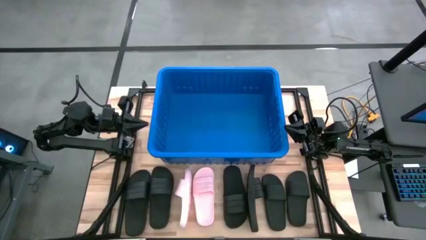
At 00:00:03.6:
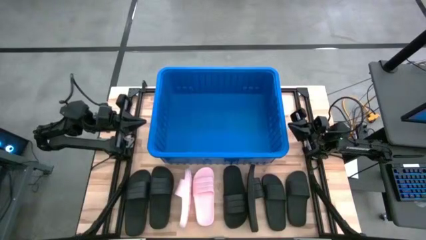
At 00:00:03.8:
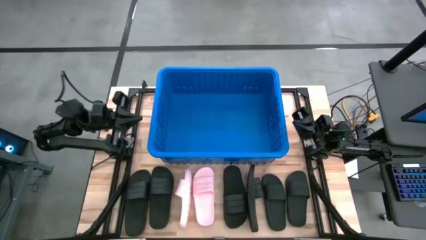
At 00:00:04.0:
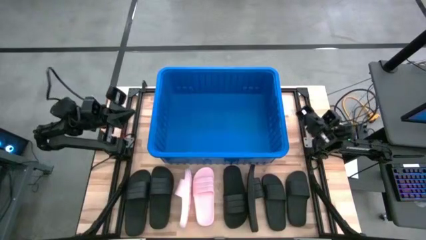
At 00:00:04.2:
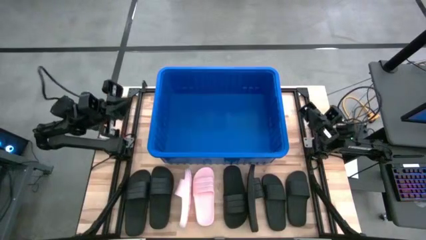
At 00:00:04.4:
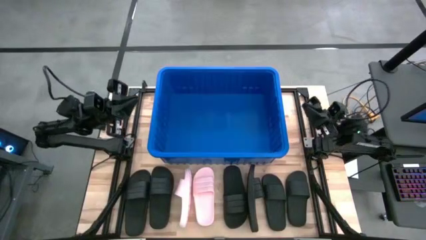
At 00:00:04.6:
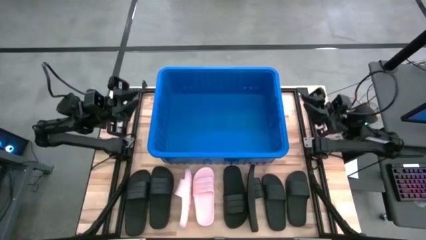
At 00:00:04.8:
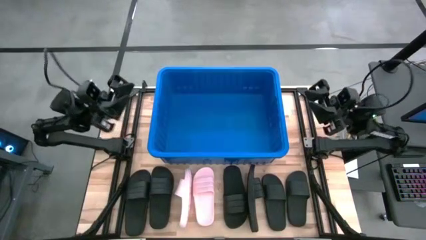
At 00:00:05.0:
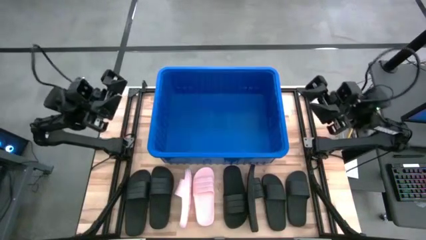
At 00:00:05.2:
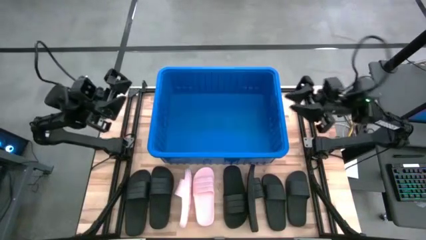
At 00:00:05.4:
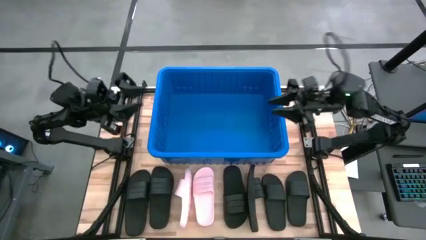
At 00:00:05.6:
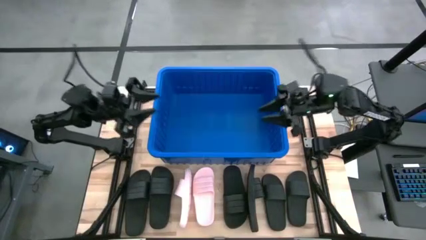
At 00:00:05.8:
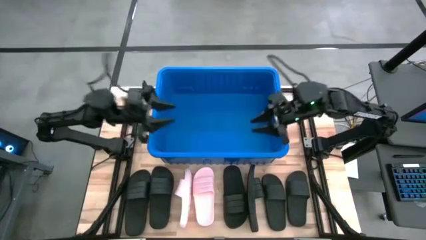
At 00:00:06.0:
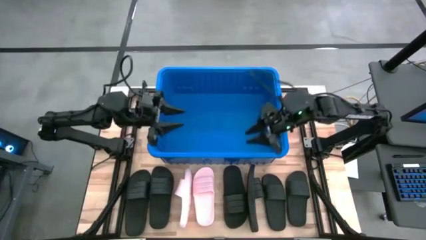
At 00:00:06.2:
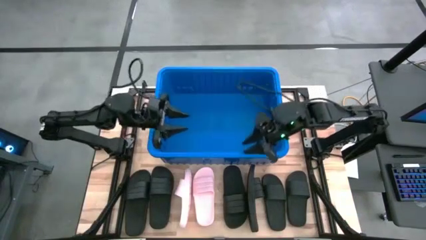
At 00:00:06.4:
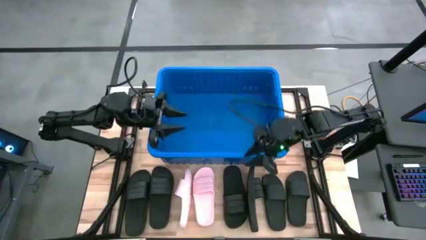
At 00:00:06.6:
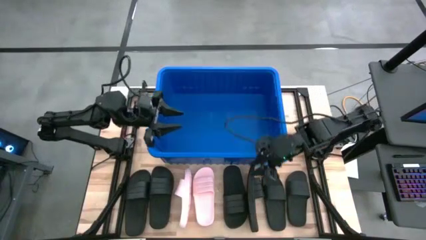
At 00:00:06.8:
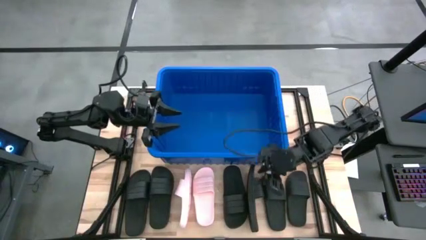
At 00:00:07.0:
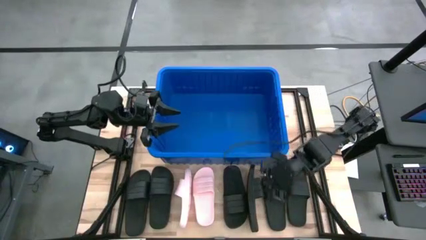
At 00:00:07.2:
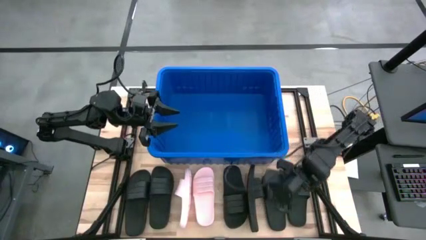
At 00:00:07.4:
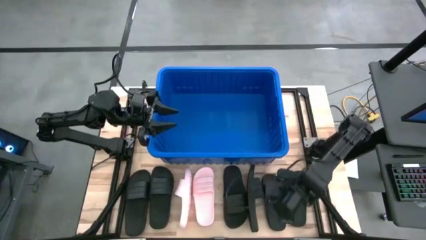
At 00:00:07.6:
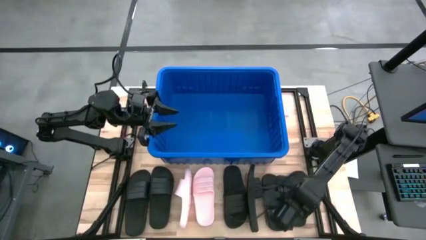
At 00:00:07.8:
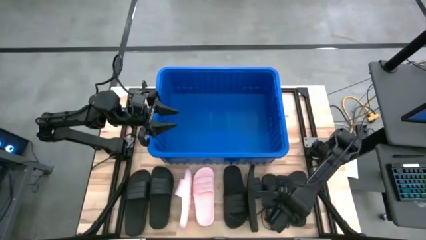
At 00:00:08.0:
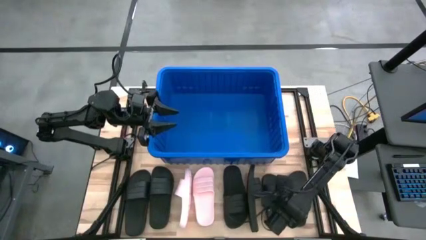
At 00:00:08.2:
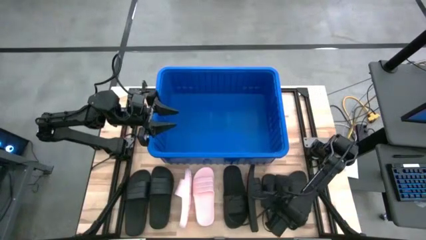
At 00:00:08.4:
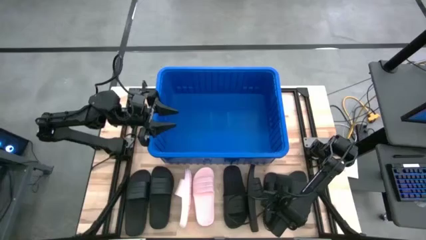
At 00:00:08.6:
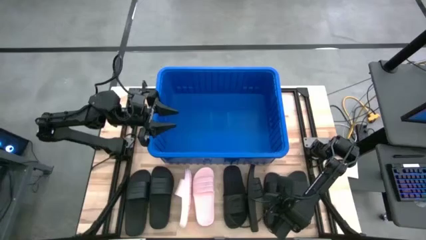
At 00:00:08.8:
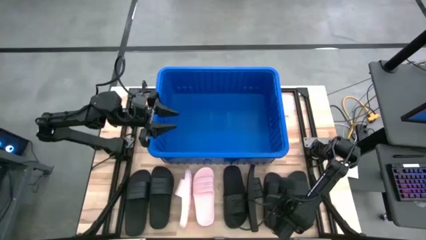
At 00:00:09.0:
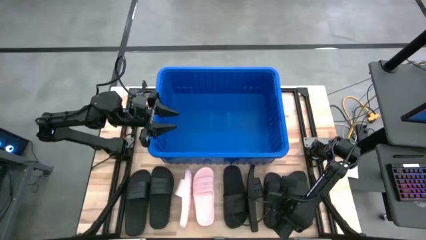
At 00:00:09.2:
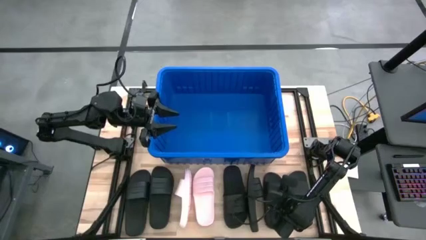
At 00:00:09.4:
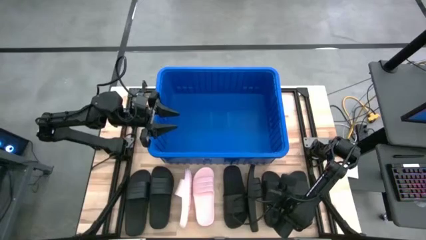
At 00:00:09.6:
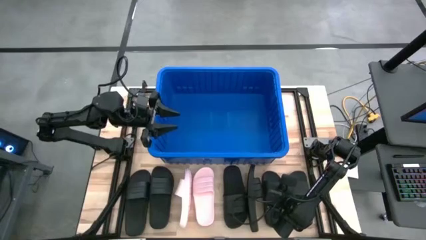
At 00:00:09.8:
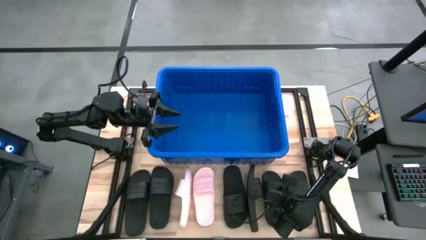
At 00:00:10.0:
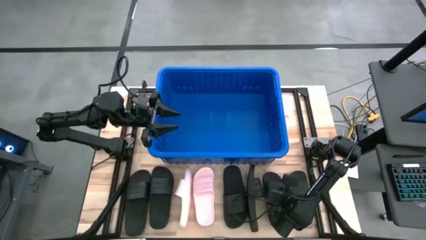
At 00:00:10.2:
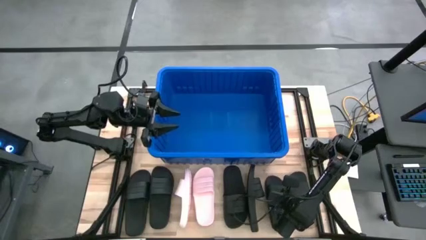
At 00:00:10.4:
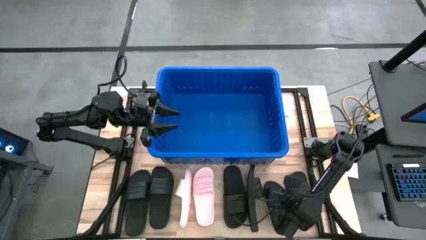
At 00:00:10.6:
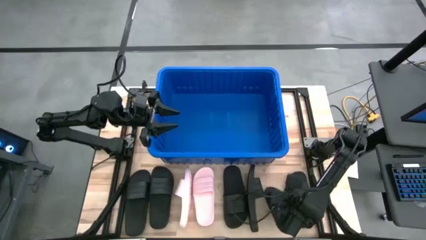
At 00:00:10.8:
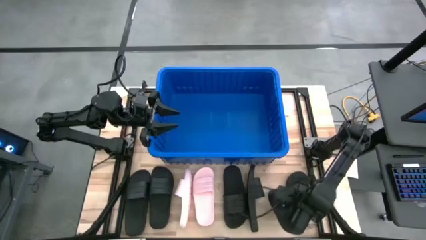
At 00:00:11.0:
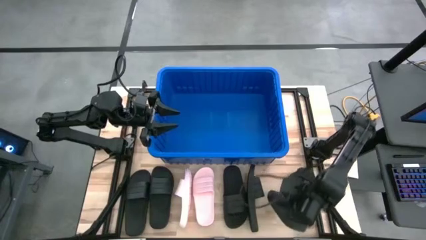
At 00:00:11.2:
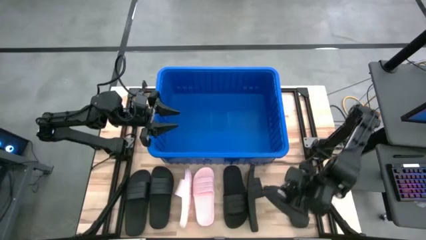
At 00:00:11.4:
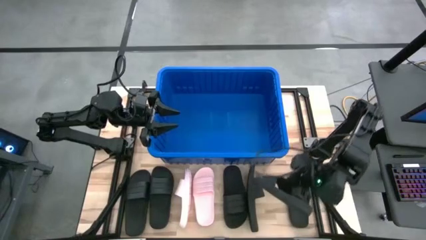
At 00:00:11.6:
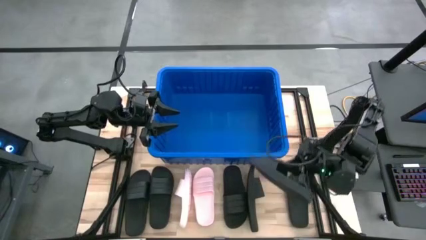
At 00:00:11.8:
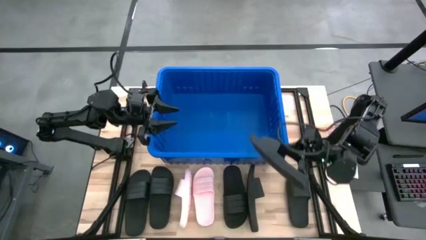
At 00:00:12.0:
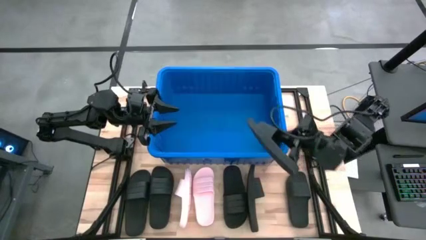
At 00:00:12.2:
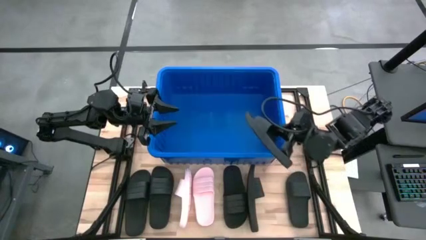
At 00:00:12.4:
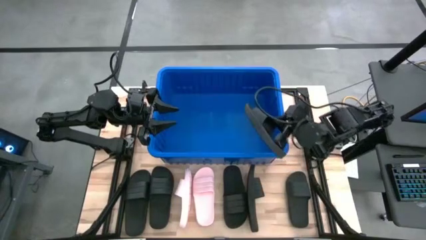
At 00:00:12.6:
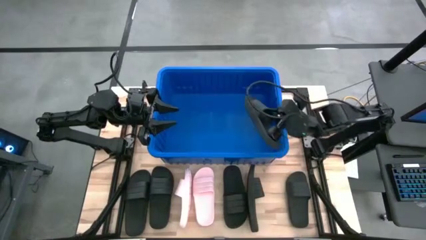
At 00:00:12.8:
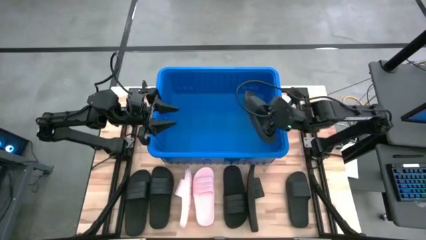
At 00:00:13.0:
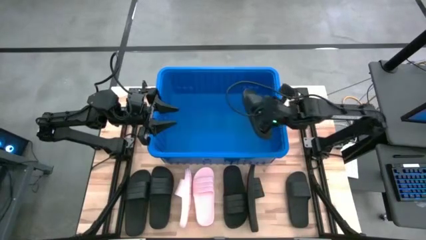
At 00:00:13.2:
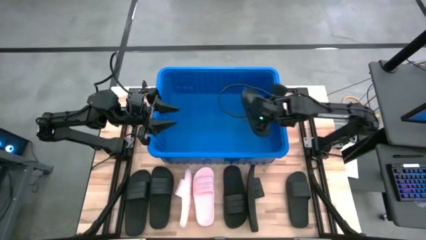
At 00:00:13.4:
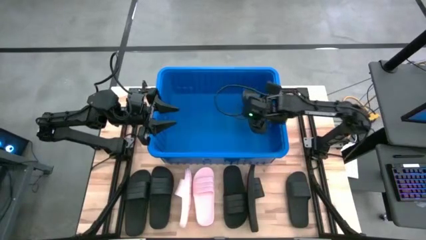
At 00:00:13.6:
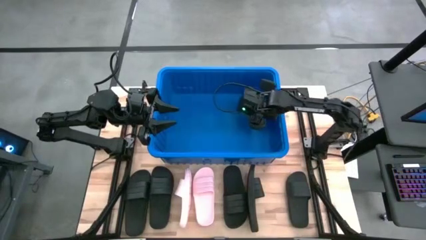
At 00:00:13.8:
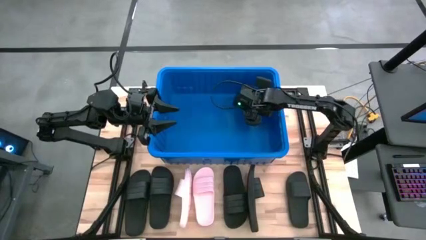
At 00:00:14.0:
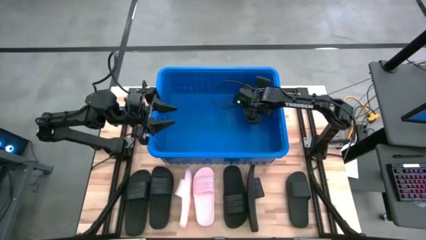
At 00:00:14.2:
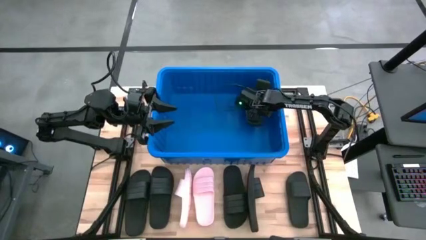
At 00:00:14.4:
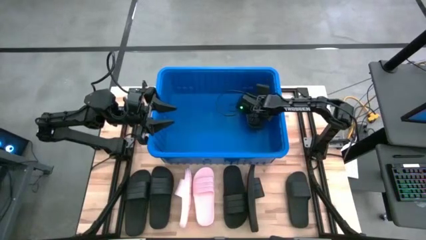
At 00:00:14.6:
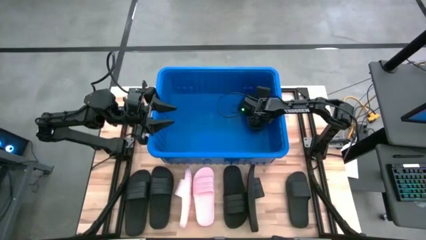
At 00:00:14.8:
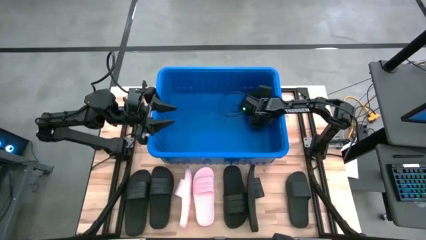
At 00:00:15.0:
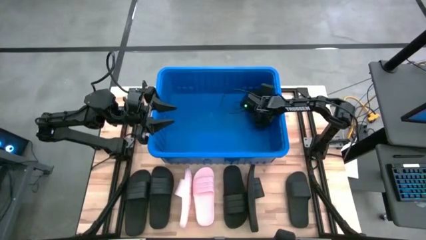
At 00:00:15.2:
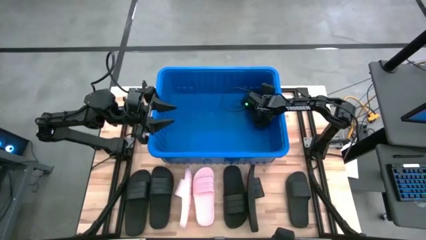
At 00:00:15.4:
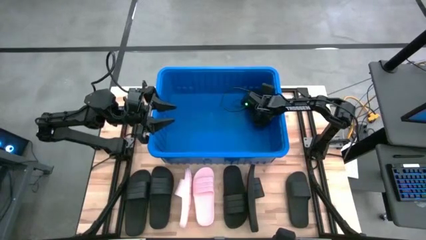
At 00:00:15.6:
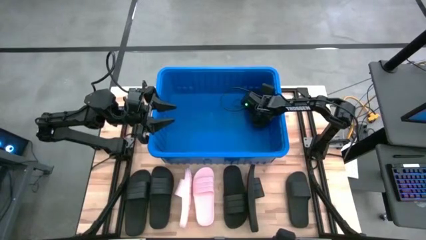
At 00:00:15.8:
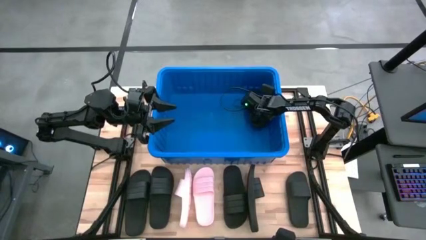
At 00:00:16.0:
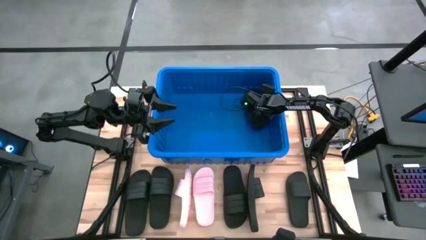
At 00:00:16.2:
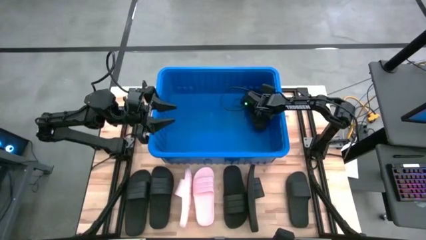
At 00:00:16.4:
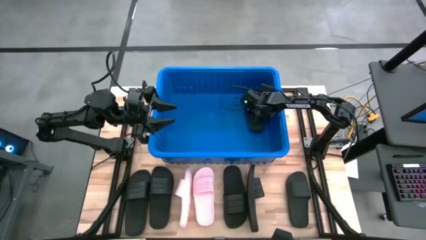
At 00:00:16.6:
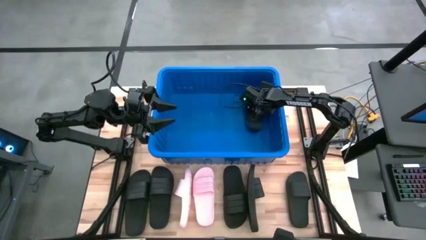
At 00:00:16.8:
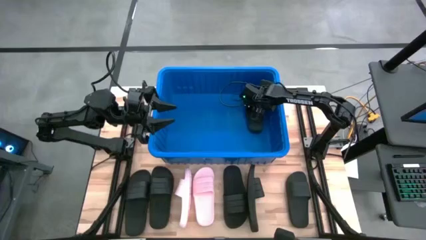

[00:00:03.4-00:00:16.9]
Task: Pick and place slides into bin
Put the black slide into the bin

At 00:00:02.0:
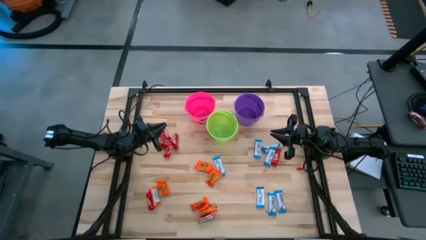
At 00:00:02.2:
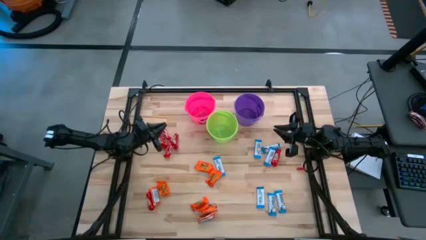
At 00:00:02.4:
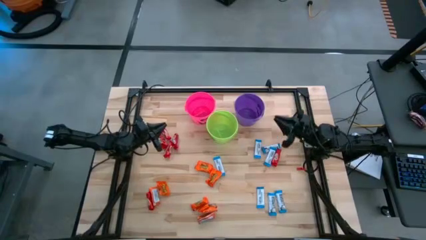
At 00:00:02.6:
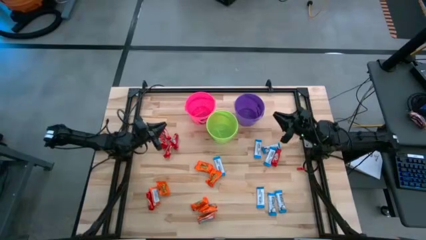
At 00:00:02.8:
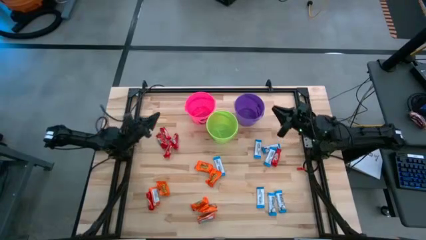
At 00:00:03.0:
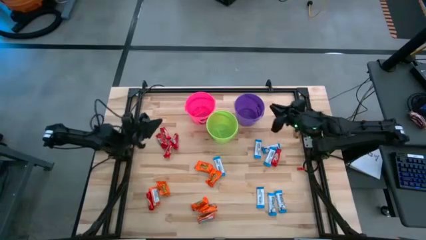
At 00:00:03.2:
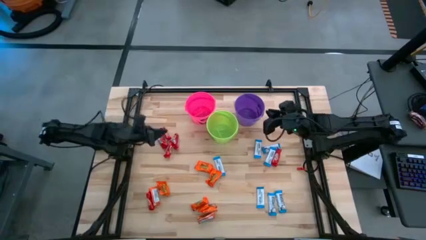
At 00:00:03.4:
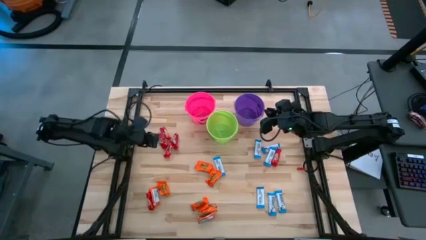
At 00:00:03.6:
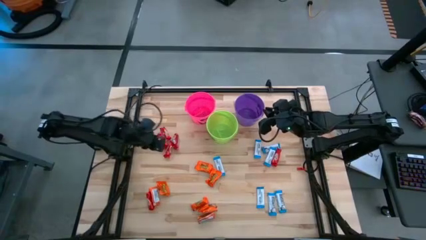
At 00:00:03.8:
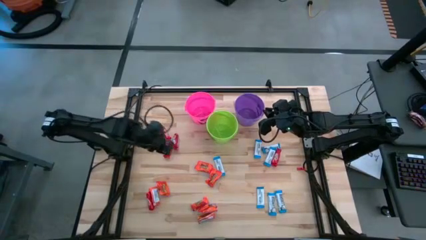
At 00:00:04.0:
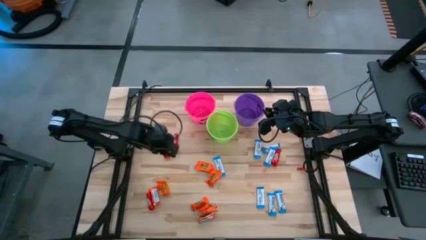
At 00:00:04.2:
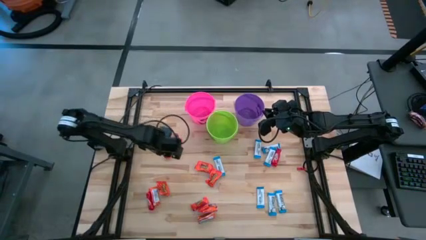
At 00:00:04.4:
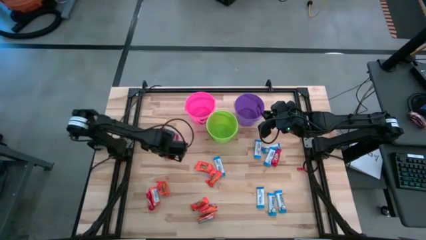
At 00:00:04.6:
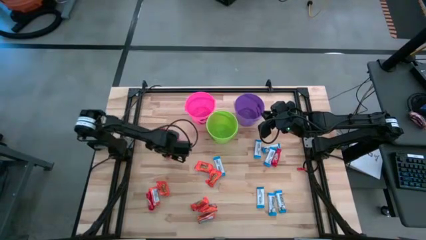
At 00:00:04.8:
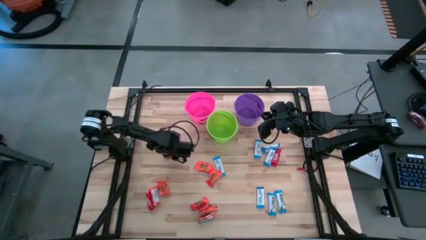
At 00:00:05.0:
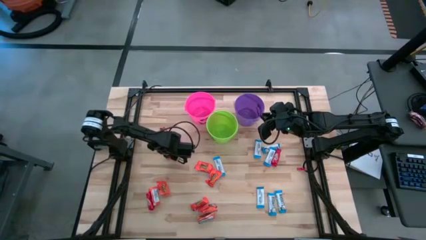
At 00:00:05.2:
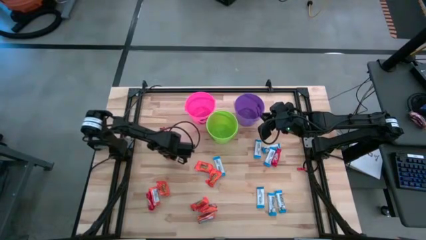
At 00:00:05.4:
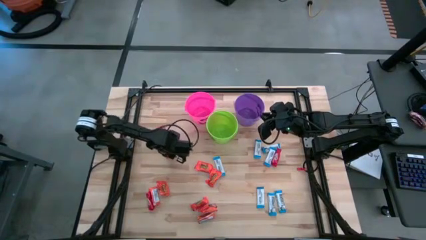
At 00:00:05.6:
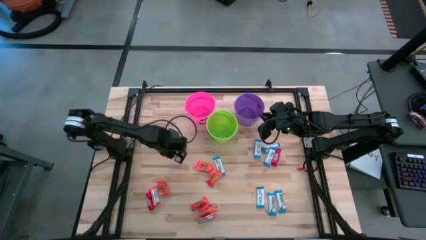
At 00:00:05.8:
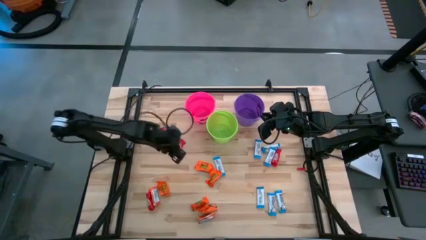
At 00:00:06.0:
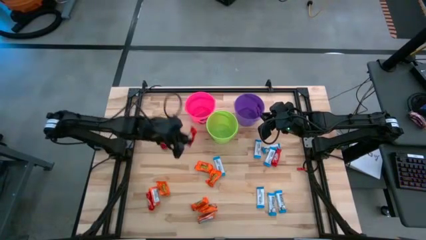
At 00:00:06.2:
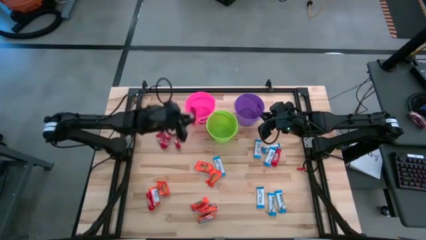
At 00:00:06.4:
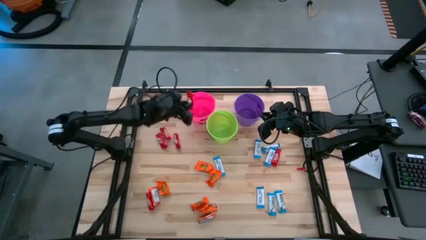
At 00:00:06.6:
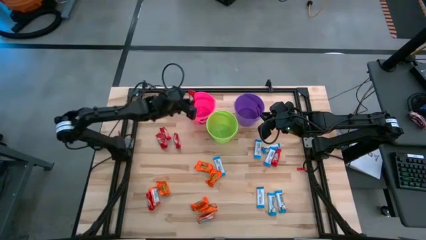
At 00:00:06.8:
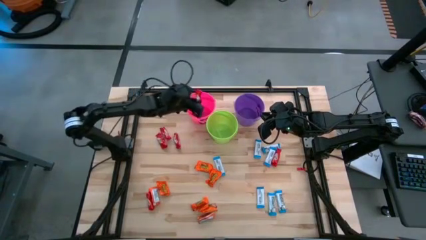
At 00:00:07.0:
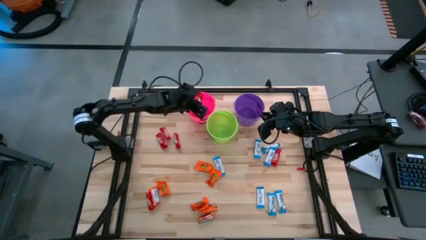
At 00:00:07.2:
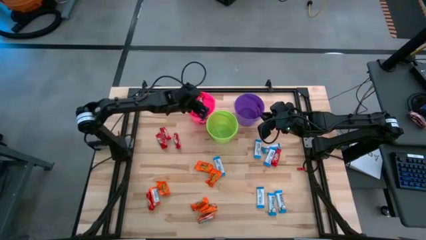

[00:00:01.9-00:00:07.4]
Task: Sort candy
Put the red candy into the pink bin
